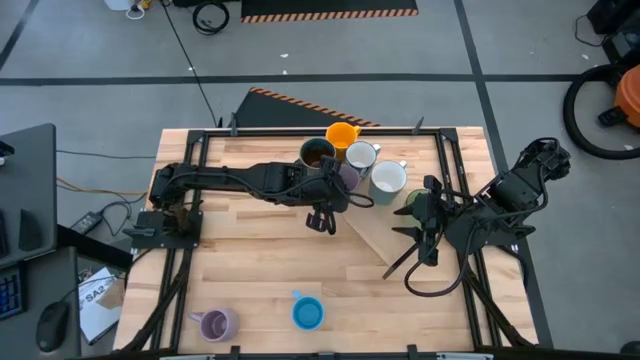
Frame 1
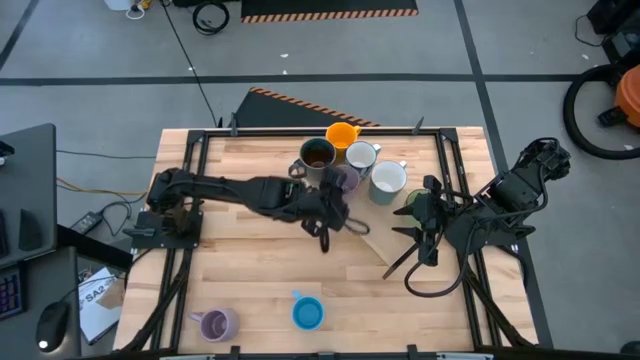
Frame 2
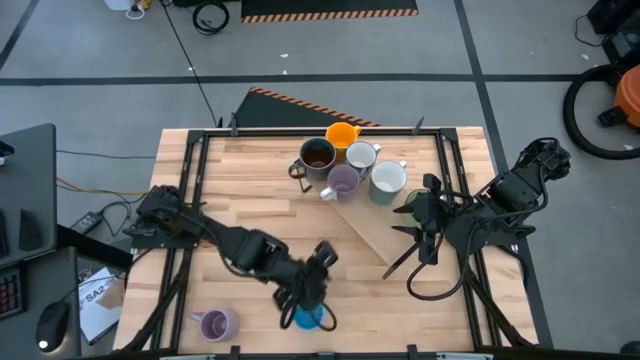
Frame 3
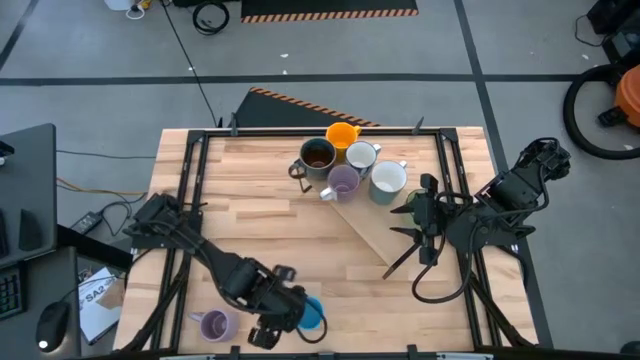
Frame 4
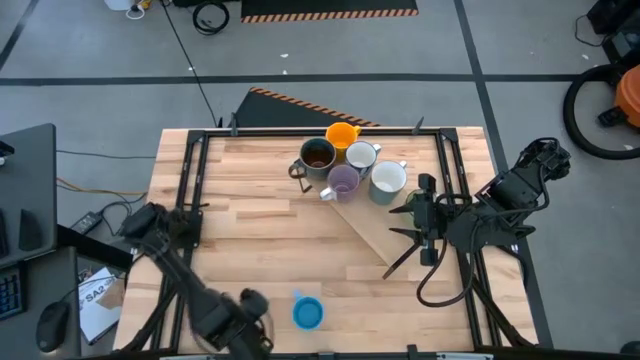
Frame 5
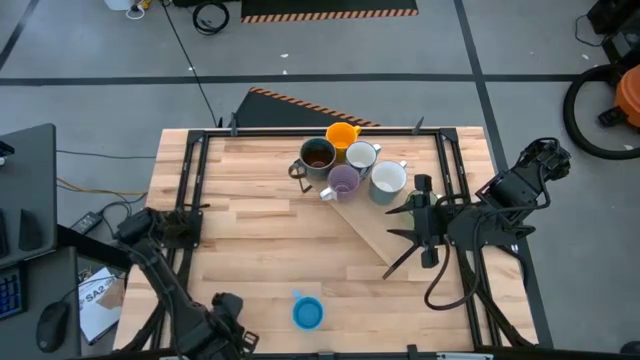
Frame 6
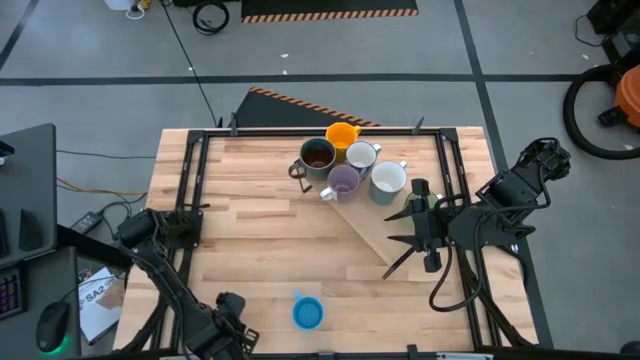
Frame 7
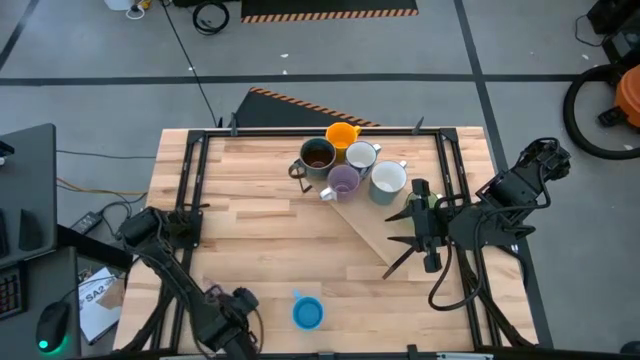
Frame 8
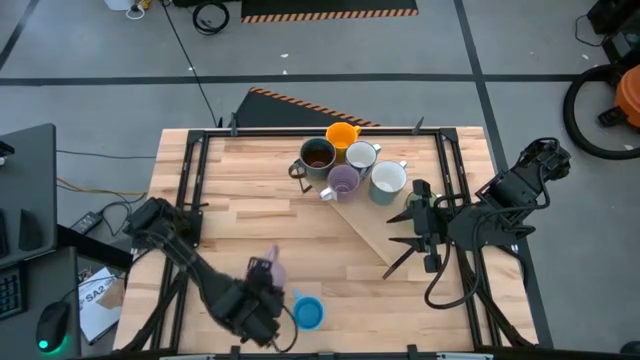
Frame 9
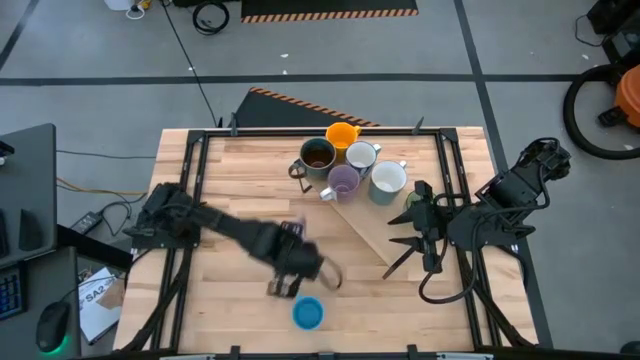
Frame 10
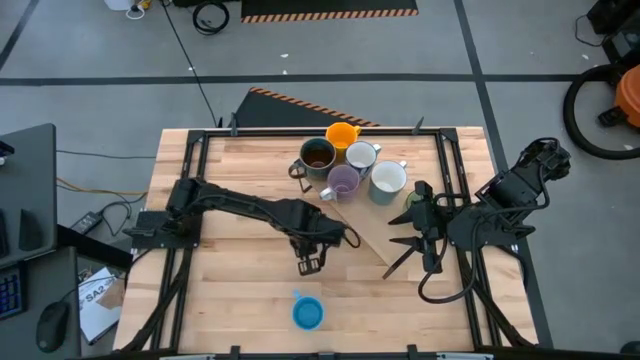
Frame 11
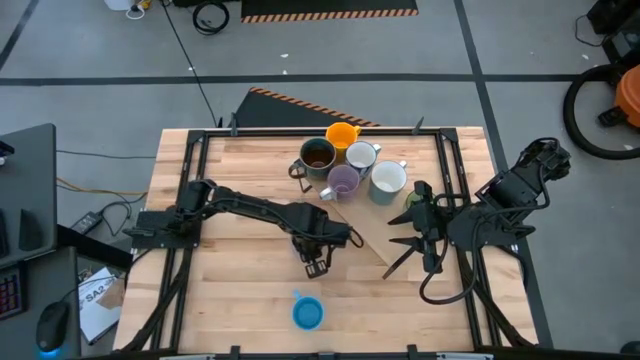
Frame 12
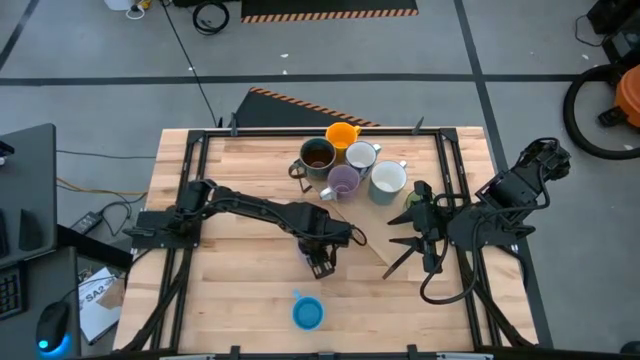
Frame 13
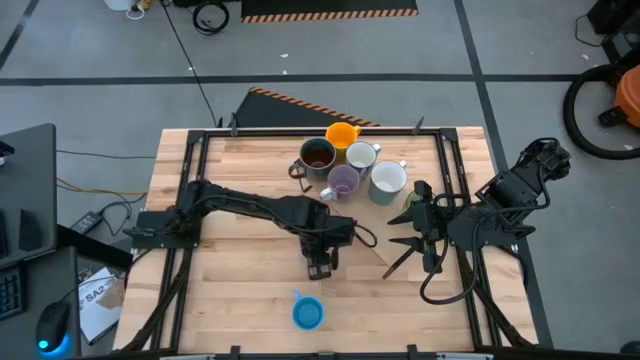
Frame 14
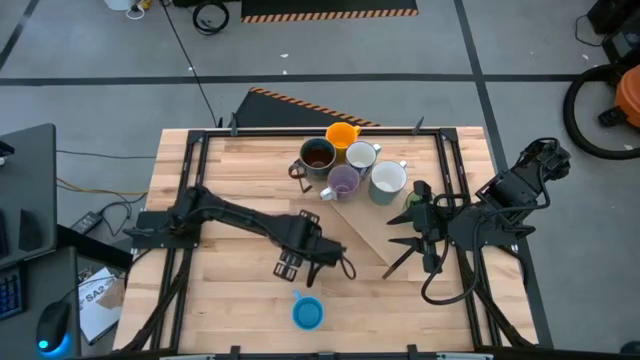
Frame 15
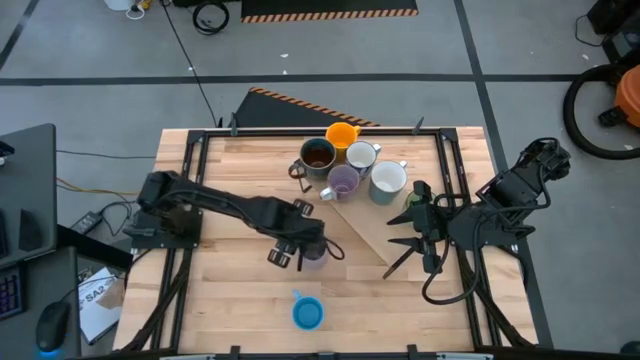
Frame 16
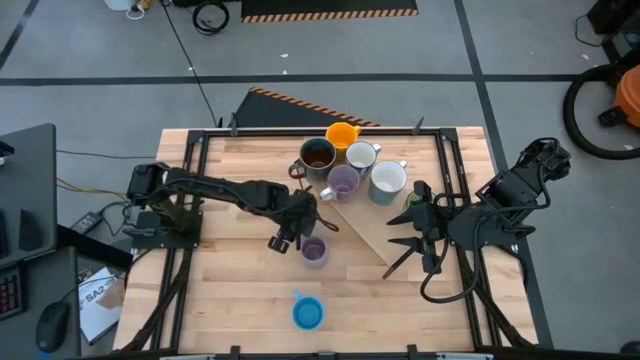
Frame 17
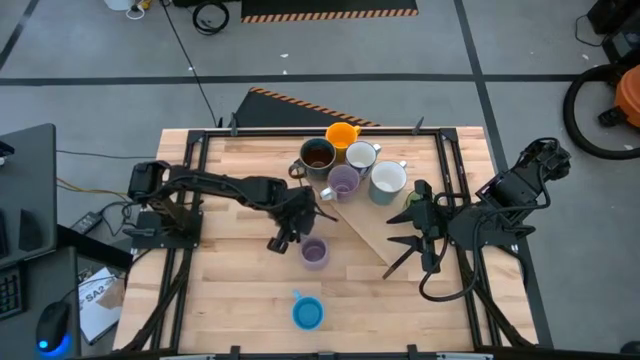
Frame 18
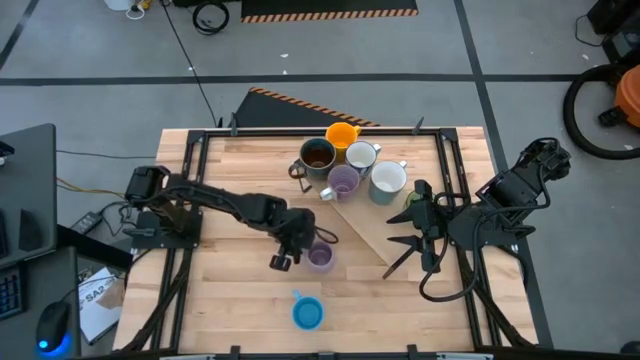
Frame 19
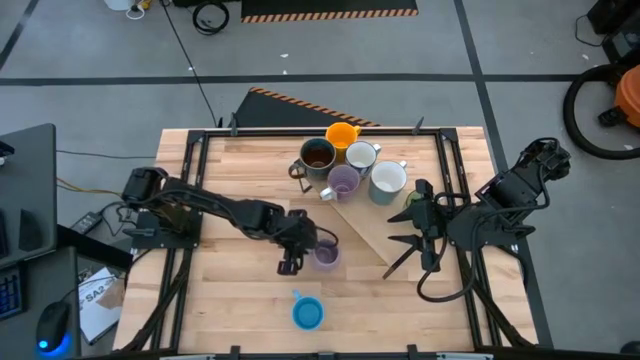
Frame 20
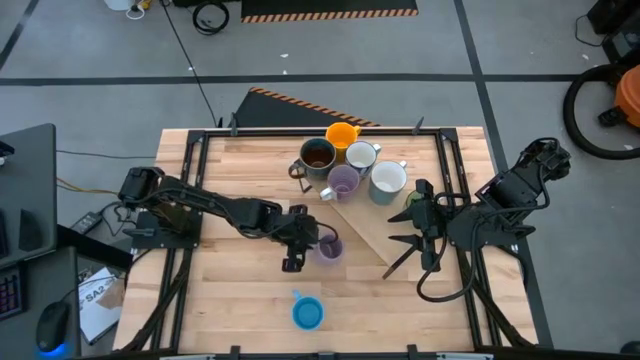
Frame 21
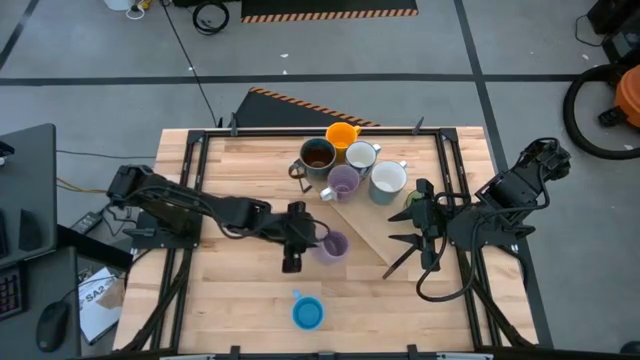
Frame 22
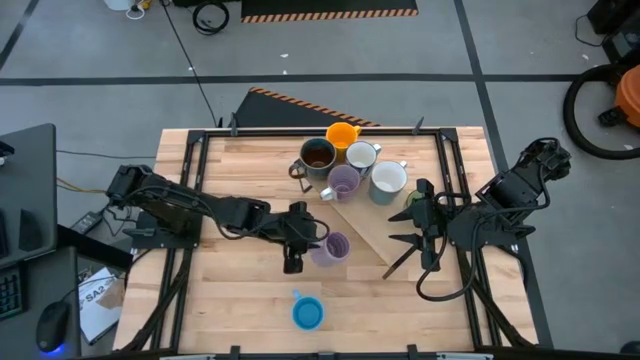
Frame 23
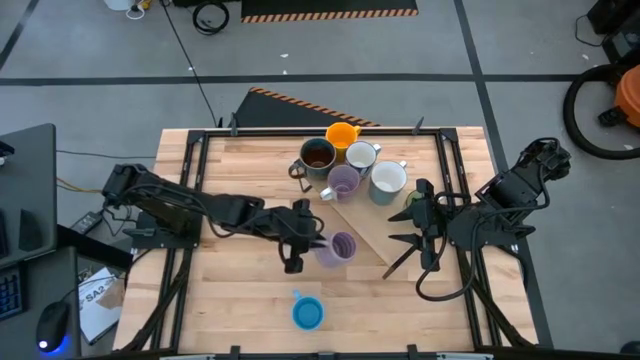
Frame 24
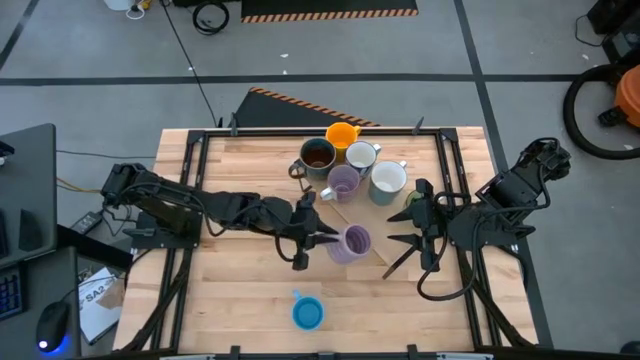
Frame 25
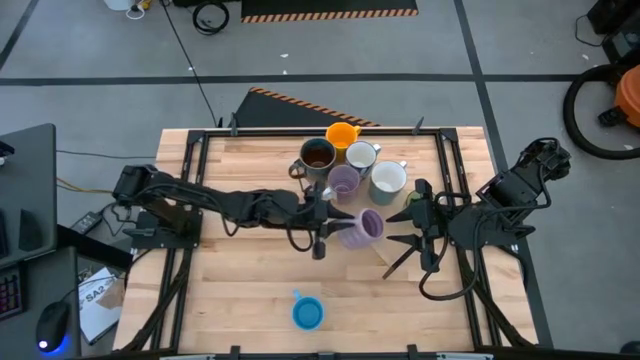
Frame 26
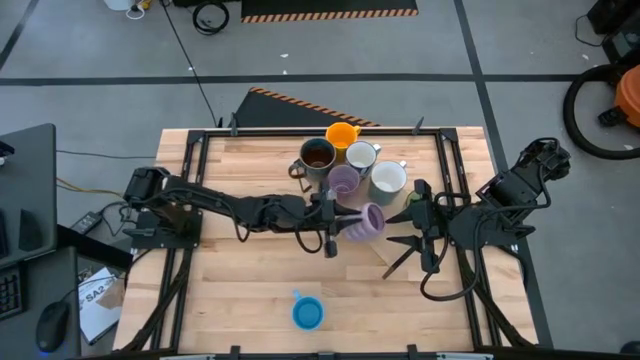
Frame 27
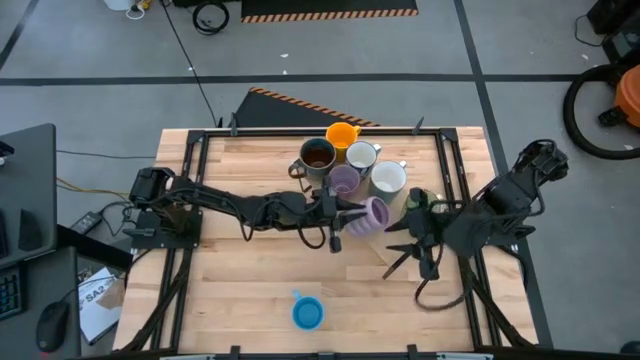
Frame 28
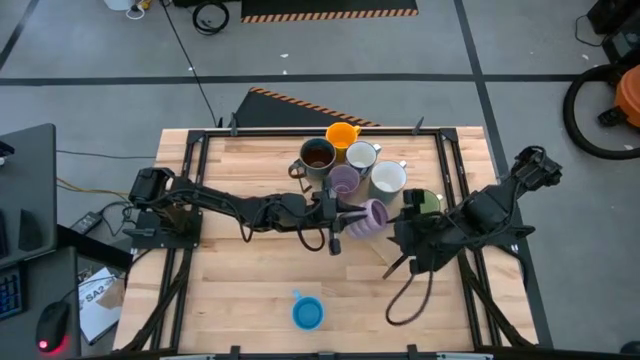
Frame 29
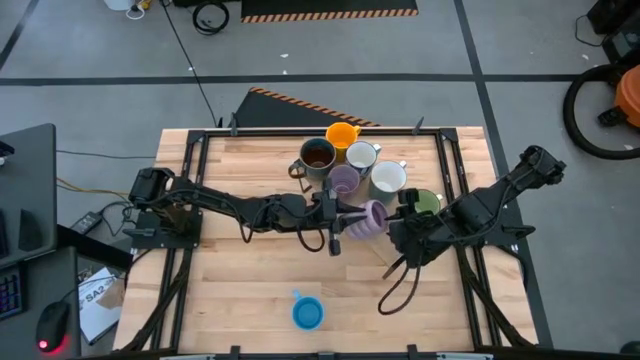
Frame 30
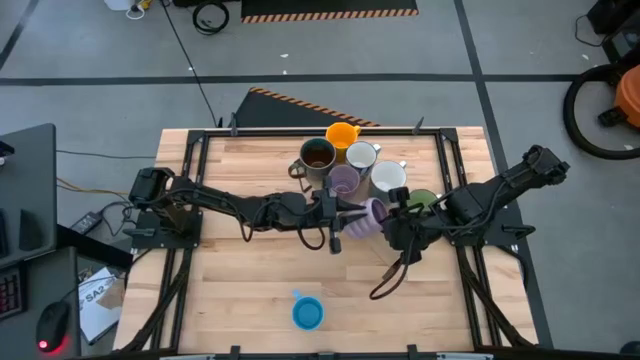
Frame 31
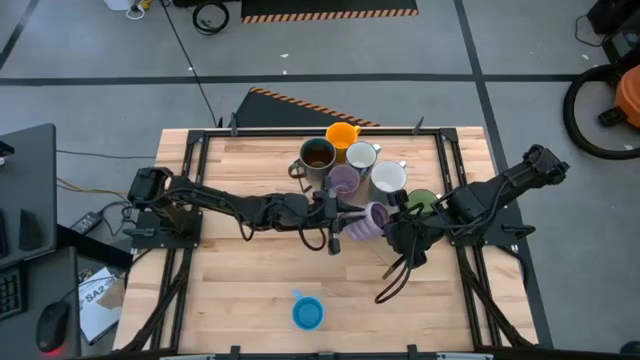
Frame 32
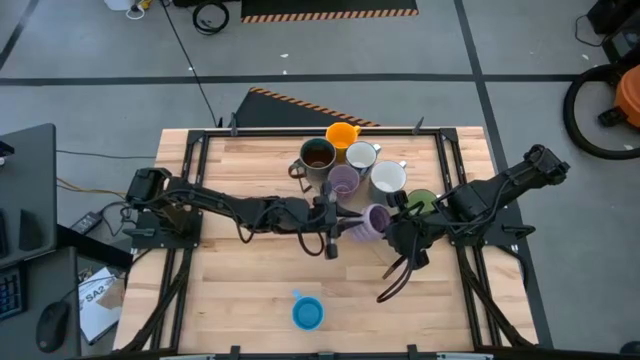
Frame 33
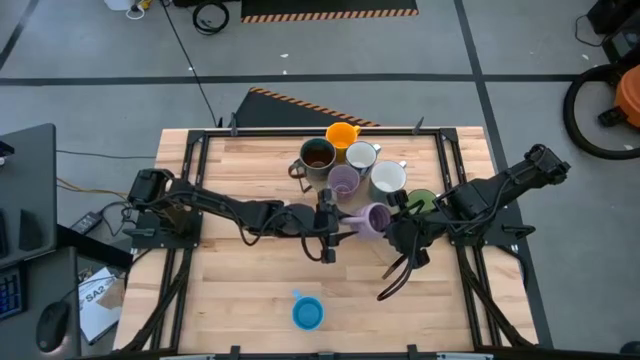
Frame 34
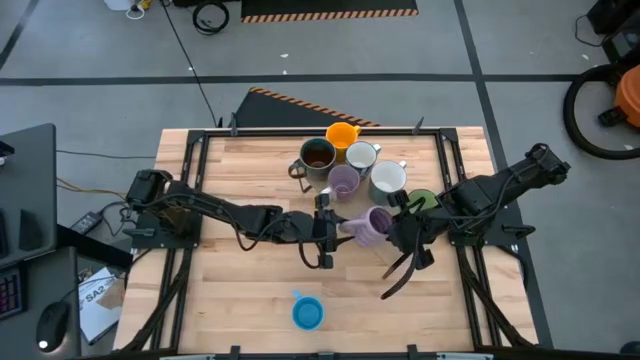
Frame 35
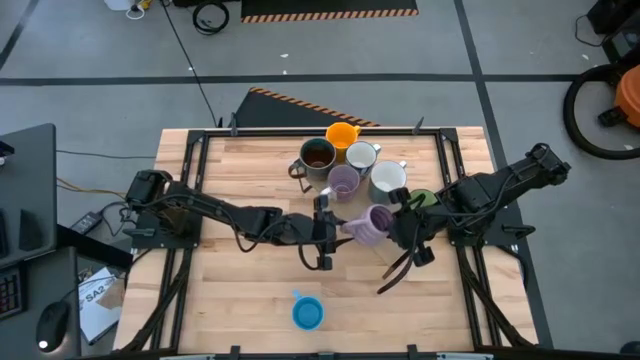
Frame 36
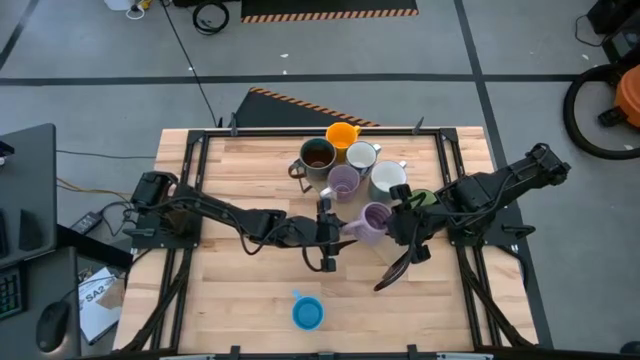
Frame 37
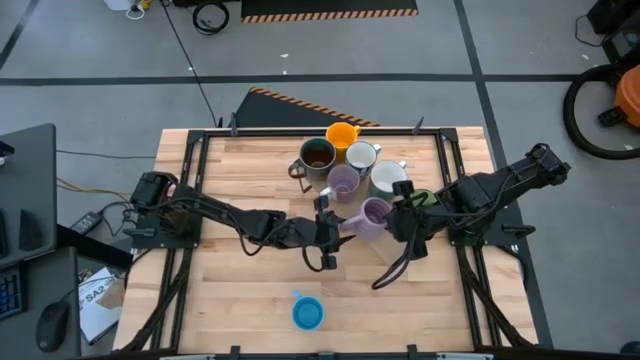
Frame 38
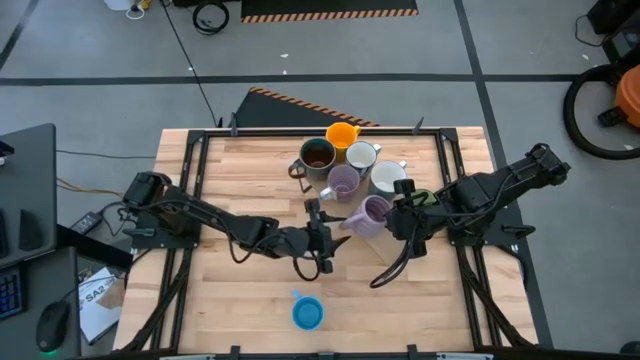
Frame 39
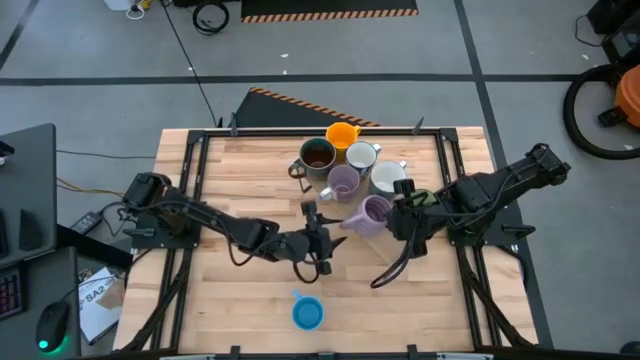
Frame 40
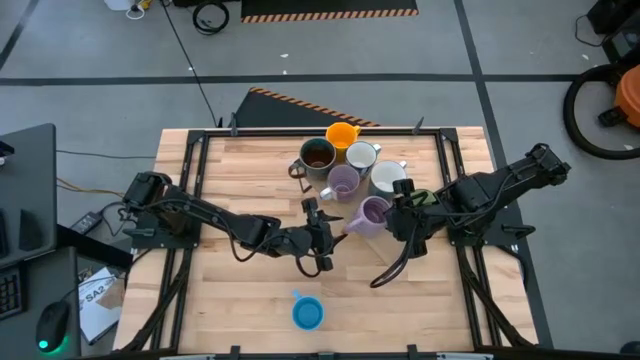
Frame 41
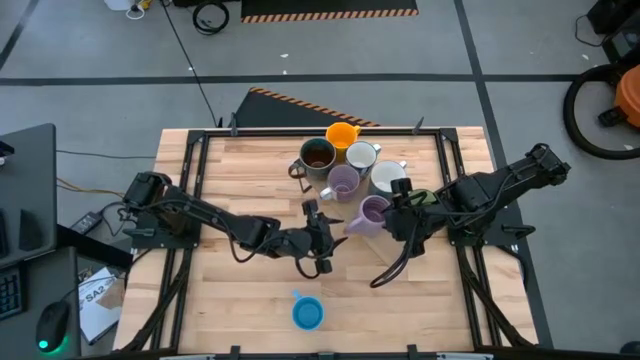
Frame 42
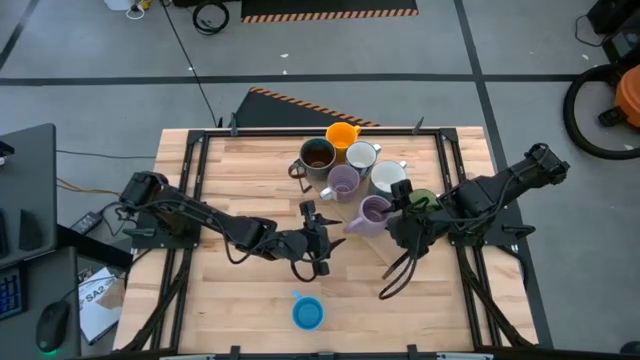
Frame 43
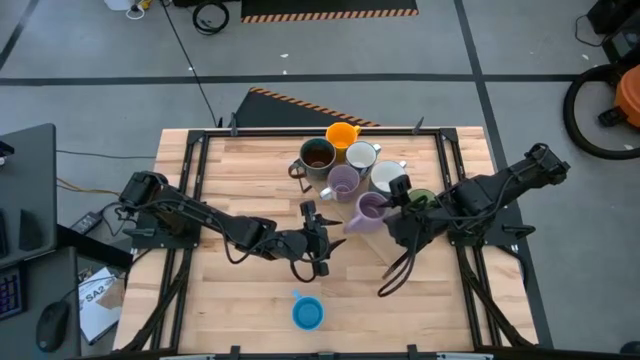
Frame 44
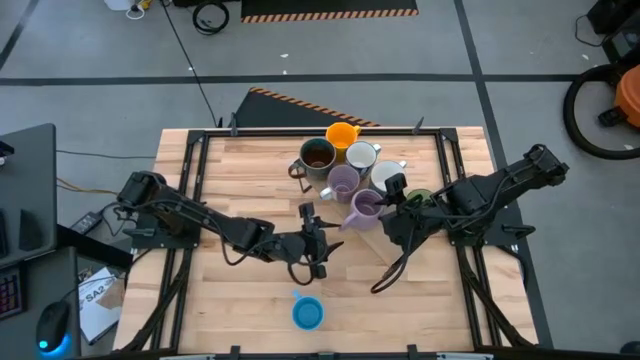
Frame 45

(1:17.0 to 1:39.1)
Task: Place coffee mugs
Put the purple mug on the shelf
